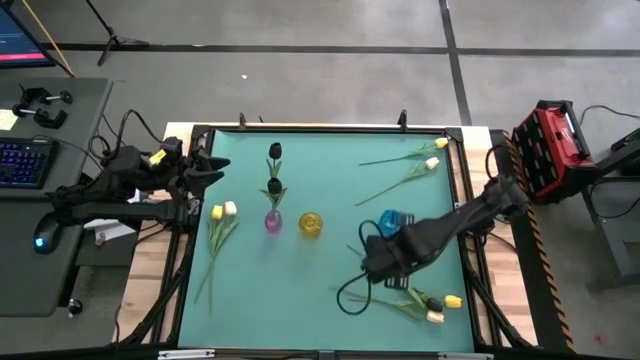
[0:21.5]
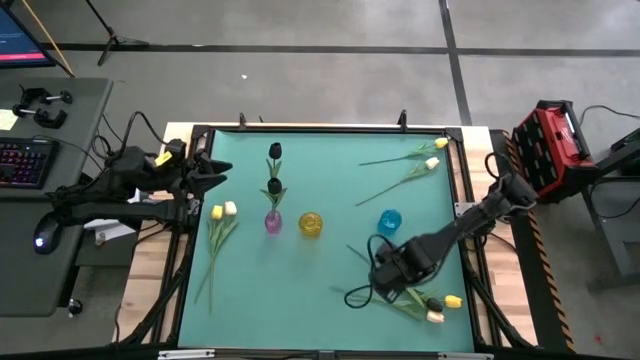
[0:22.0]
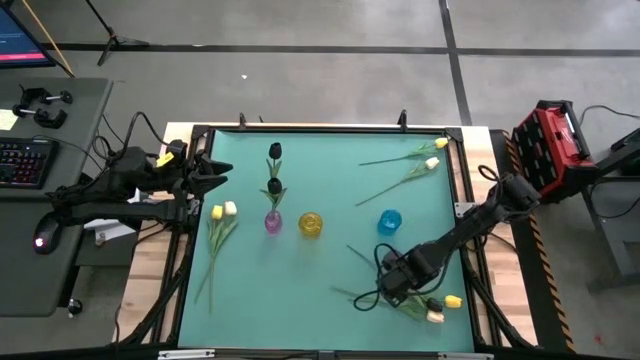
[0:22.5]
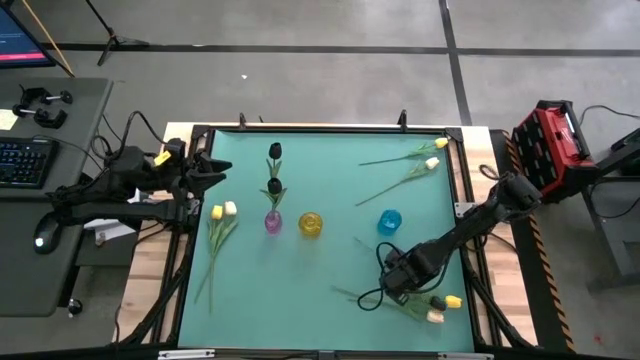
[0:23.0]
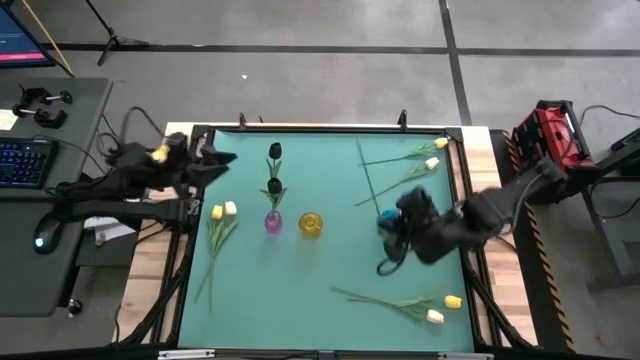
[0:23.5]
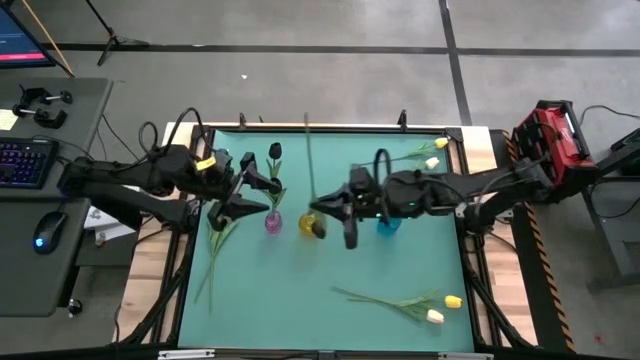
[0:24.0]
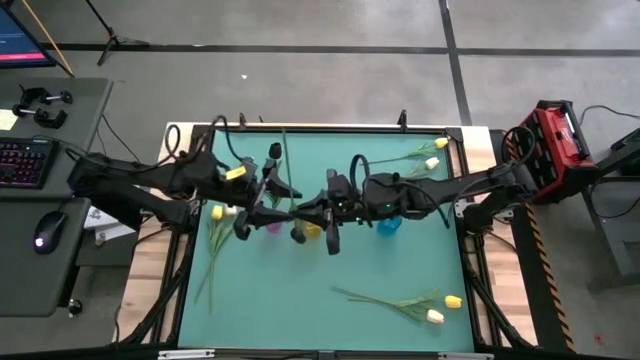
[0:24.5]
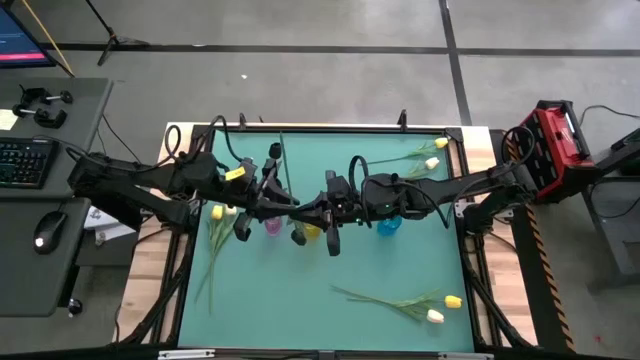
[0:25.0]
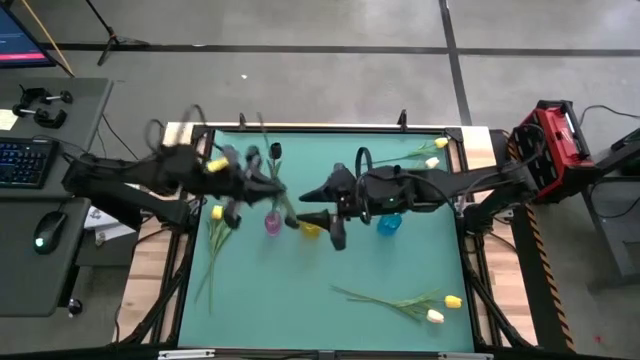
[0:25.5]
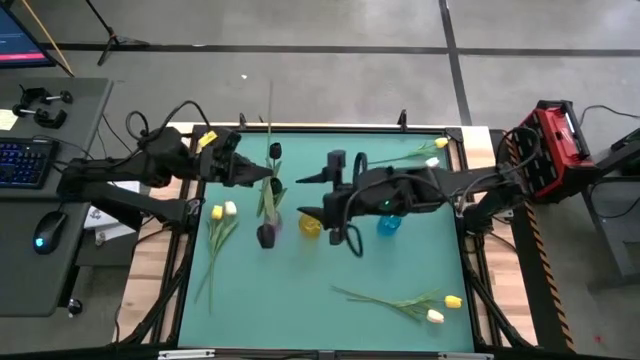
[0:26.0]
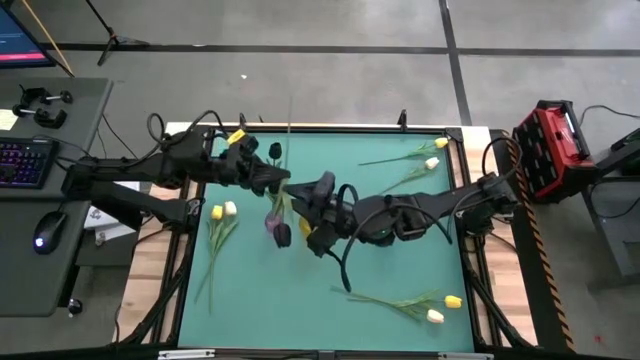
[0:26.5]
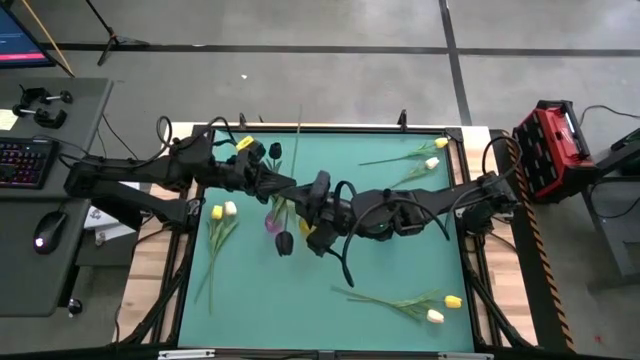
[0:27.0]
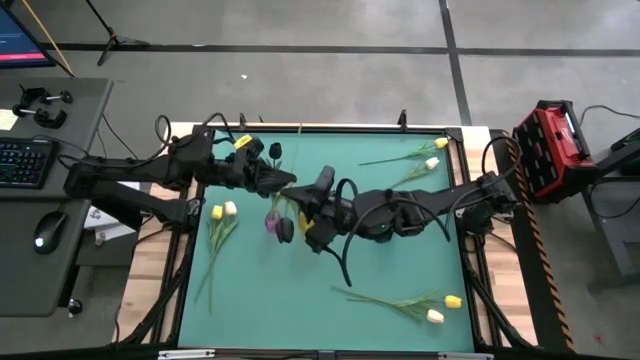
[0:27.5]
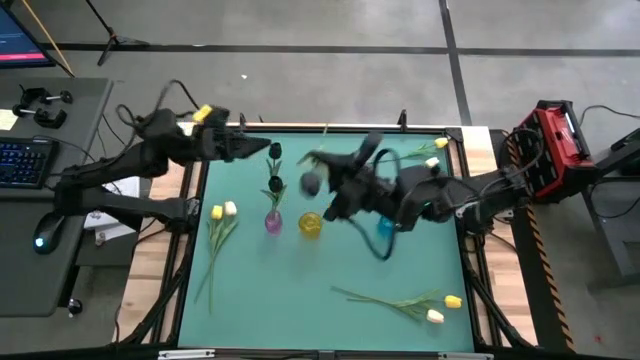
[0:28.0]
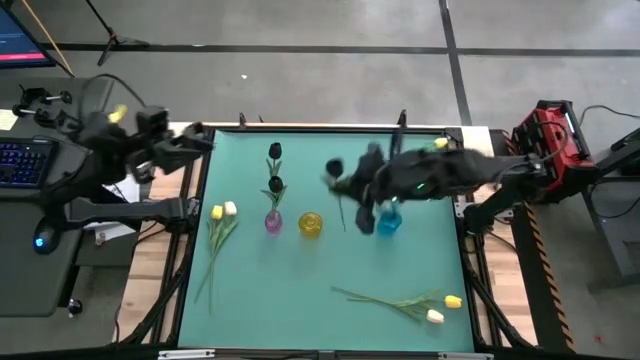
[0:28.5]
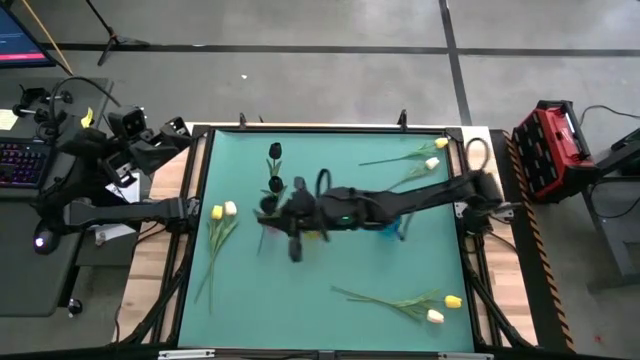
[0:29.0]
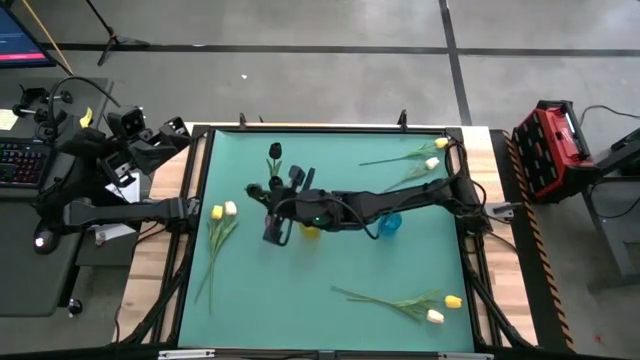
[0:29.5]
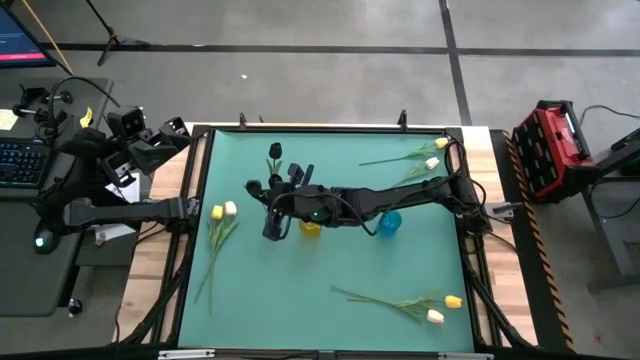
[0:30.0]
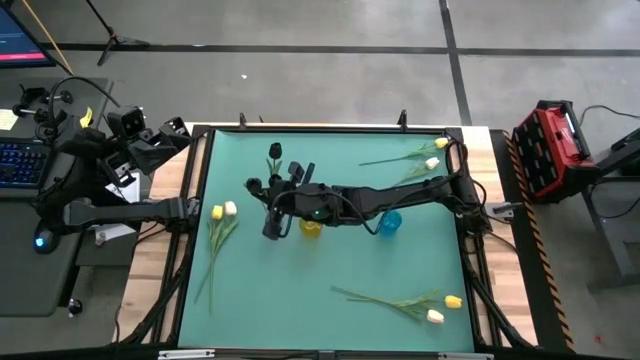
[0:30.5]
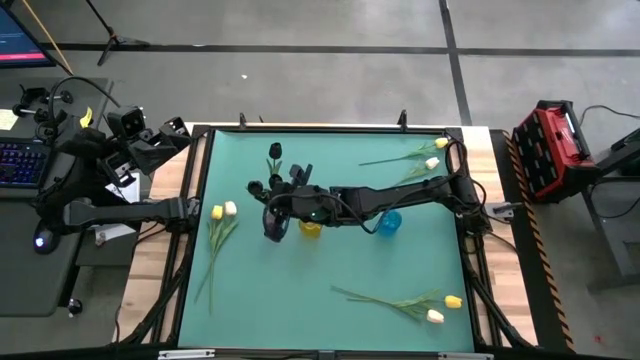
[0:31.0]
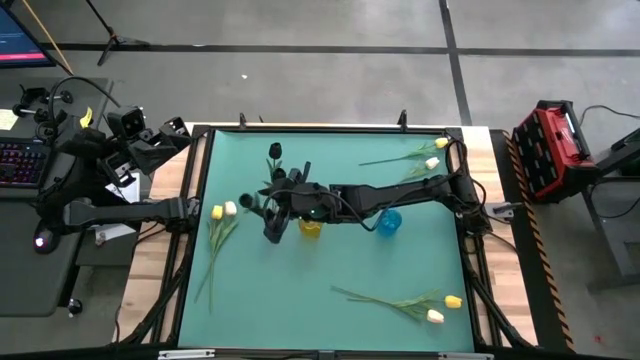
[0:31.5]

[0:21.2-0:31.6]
Task: Sort flowers into vase by color
Put the black tulip into the pink vase

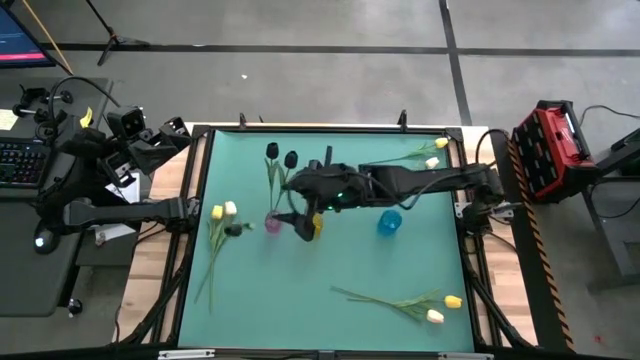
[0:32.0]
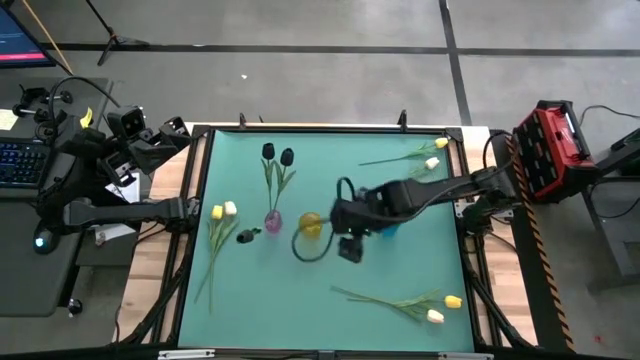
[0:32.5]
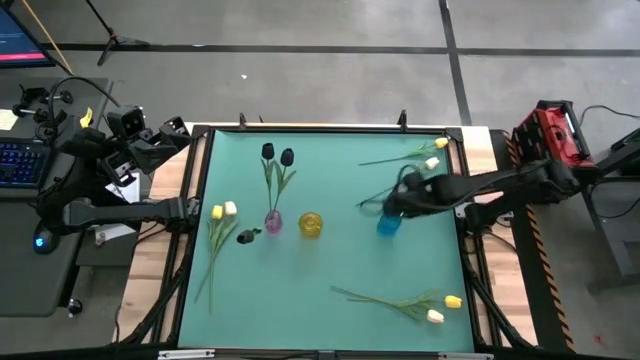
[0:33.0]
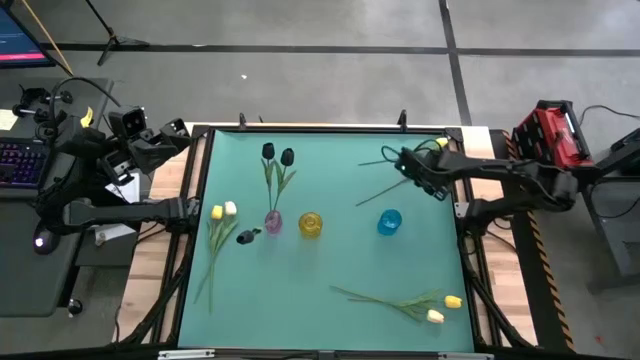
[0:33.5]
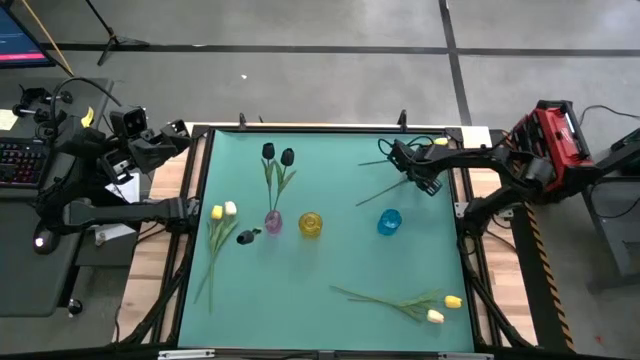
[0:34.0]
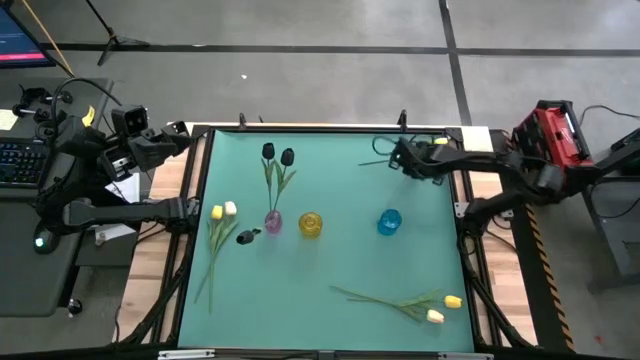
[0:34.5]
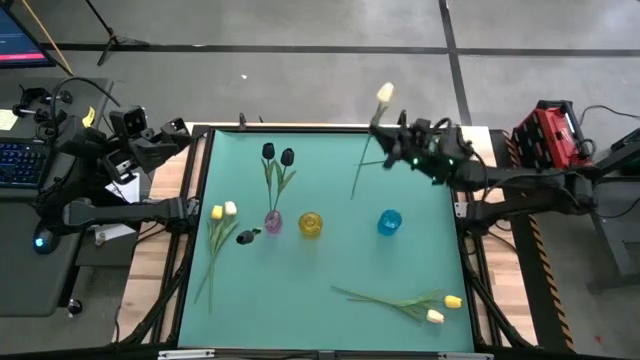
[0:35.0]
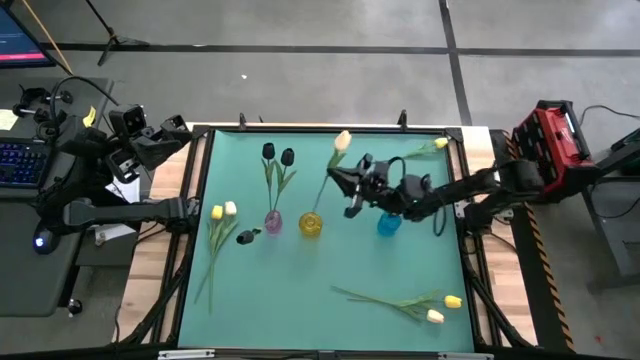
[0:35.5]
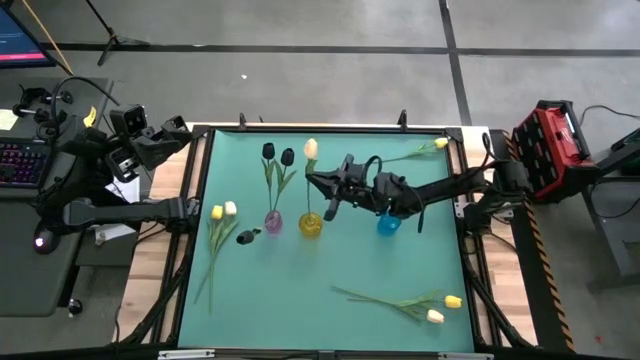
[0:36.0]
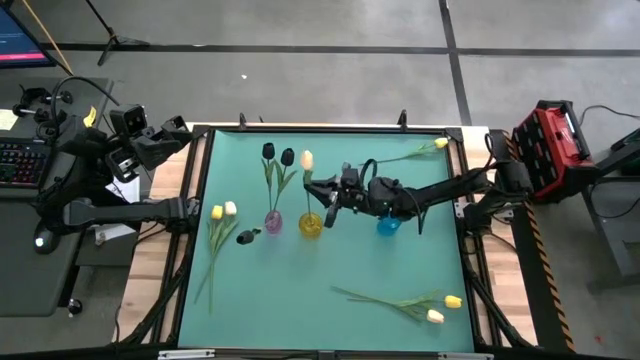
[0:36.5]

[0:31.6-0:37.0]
Put the top right white tulip into the yellow vase

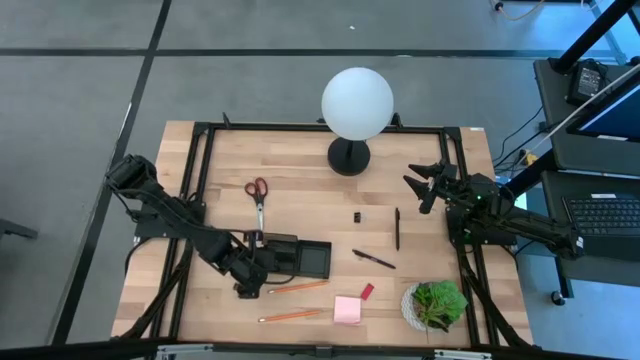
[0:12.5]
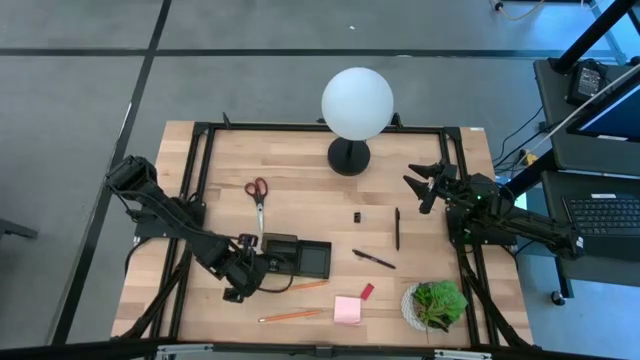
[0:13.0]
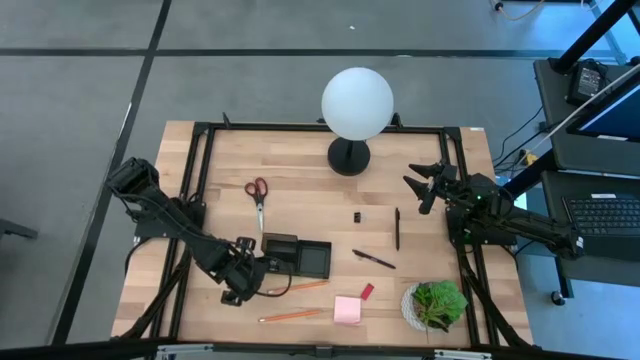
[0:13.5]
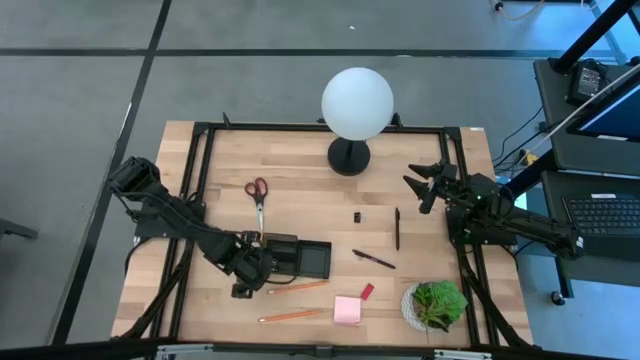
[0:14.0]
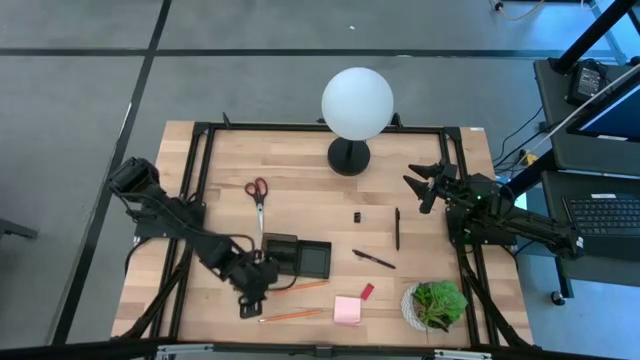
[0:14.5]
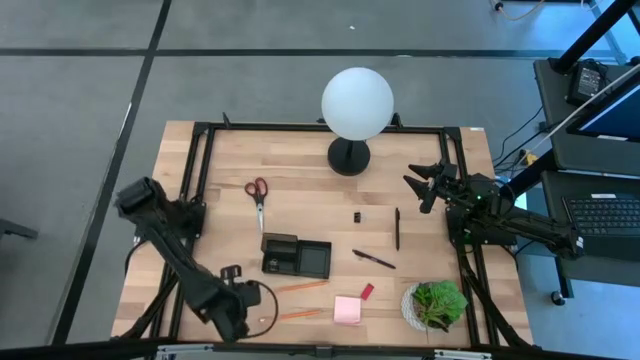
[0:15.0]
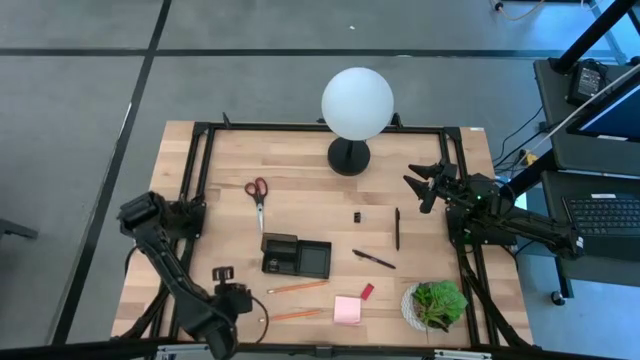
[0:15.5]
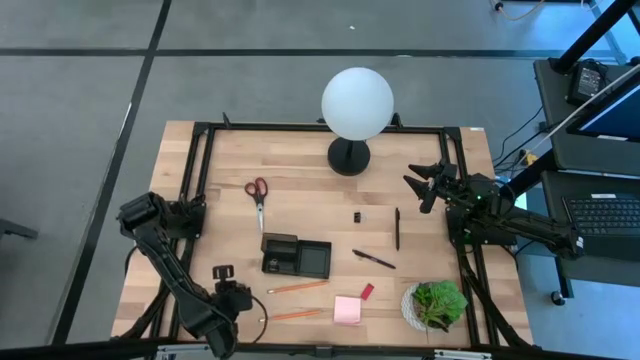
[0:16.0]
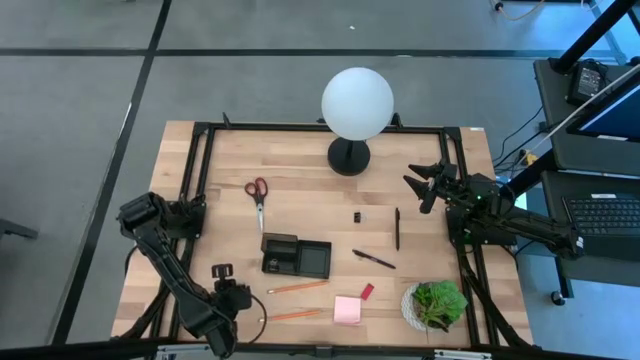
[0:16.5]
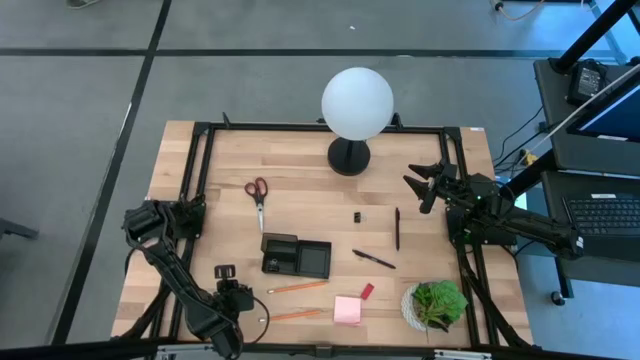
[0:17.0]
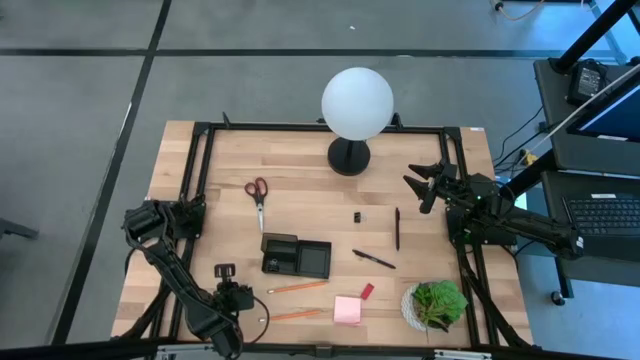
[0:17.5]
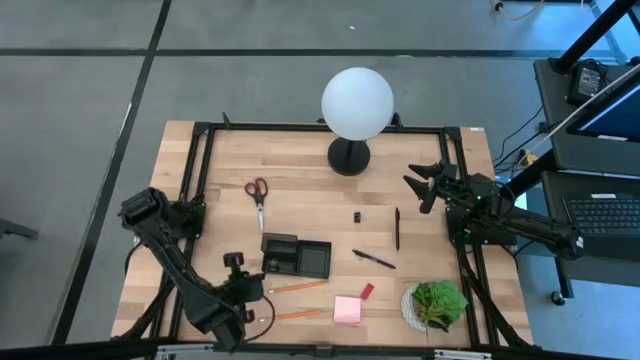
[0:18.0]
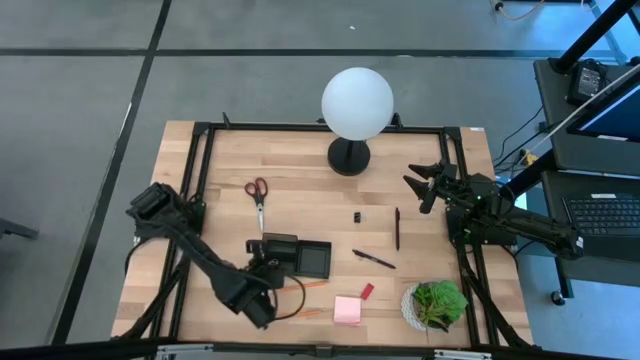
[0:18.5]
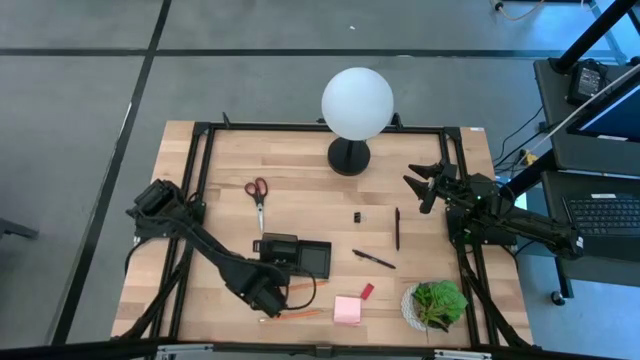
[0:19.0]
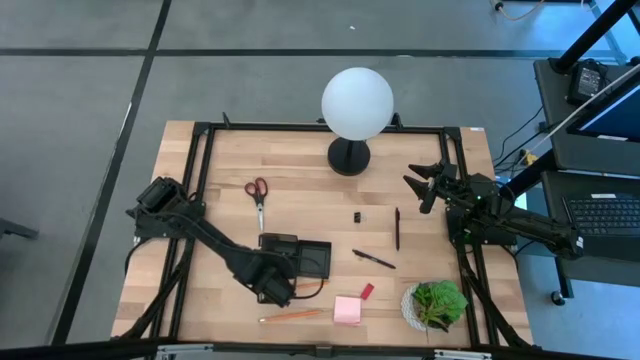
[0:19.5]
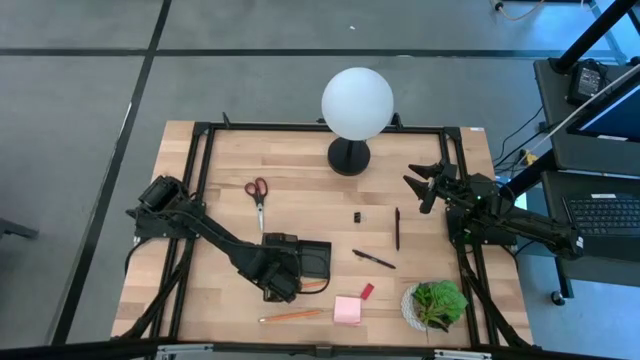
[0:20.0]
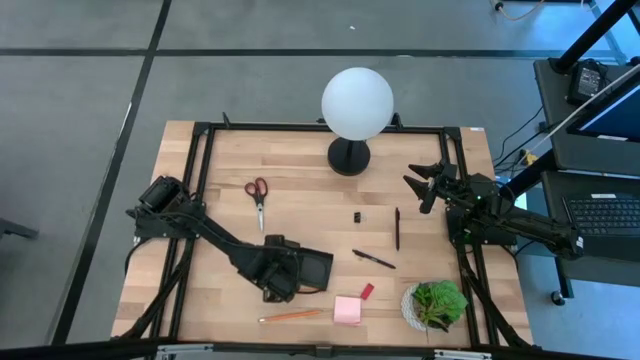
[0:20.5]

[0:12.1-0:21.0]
Task: Pick and place office supplies into organizer
Put the bottom black binder clip into the black desk organizer
